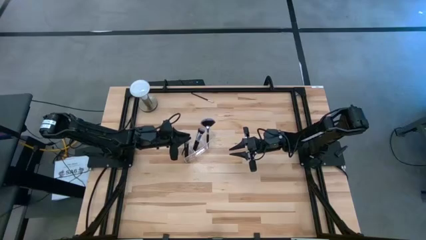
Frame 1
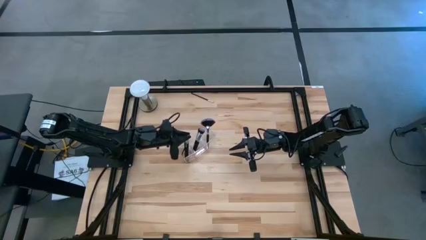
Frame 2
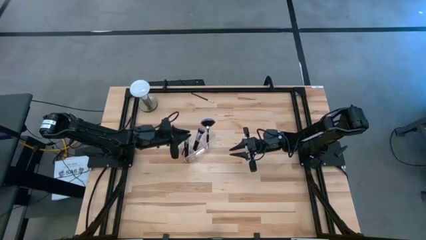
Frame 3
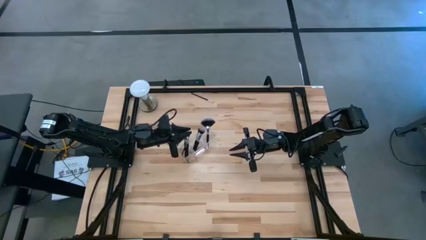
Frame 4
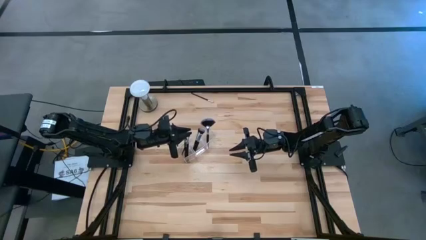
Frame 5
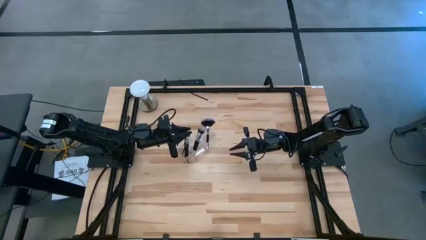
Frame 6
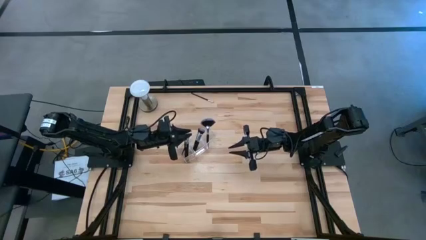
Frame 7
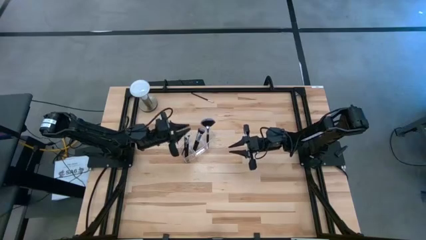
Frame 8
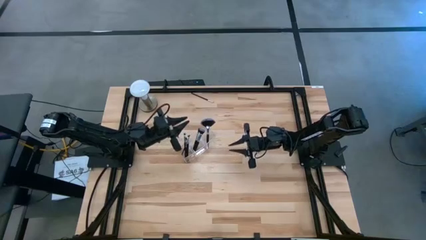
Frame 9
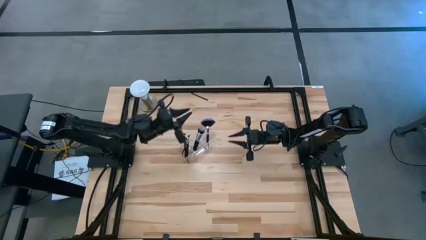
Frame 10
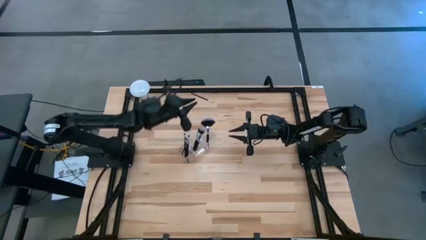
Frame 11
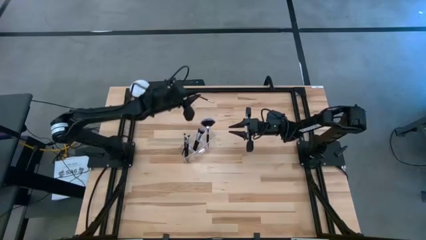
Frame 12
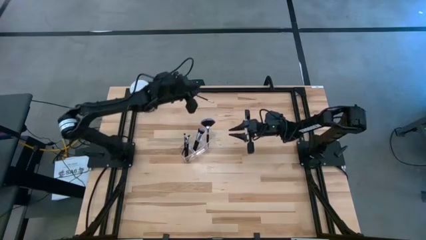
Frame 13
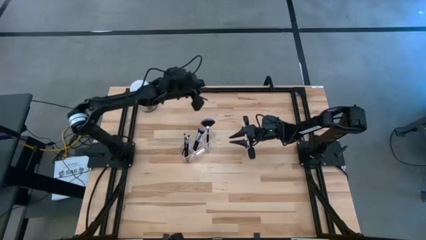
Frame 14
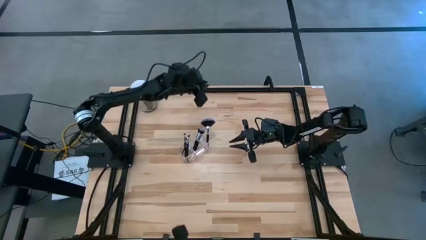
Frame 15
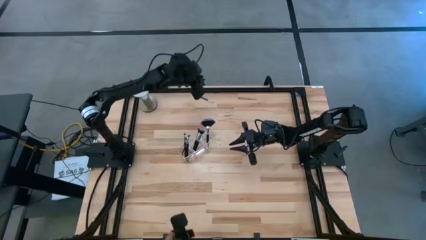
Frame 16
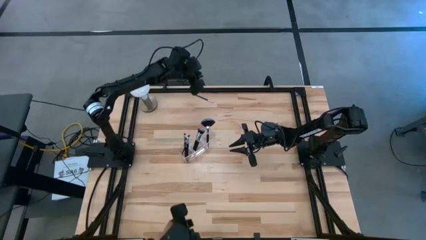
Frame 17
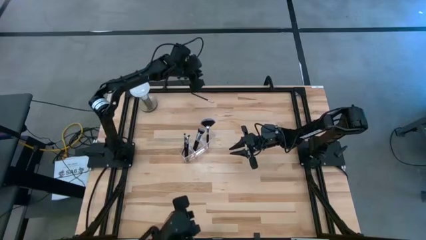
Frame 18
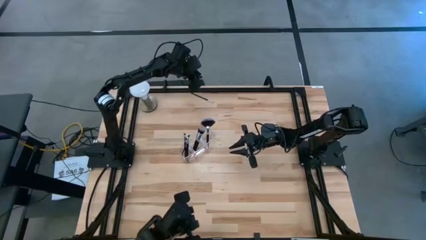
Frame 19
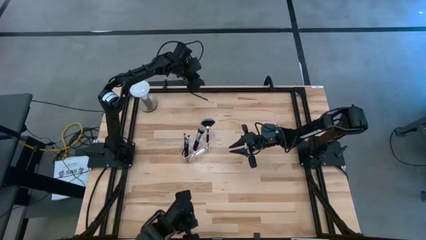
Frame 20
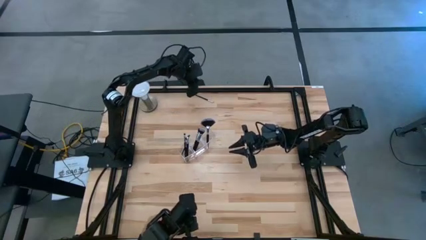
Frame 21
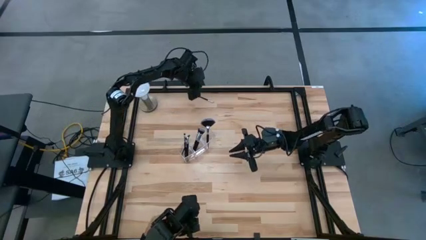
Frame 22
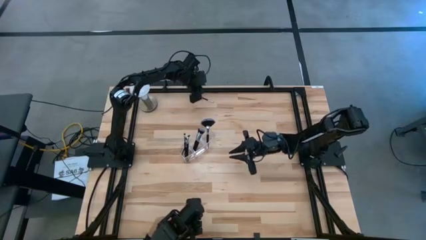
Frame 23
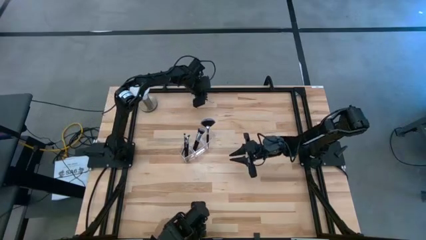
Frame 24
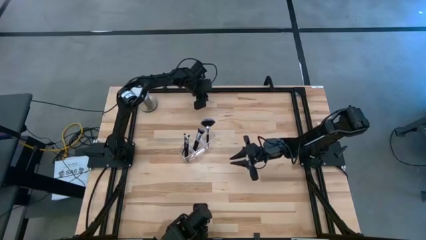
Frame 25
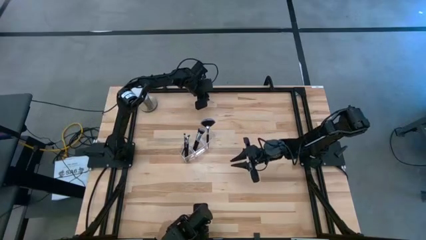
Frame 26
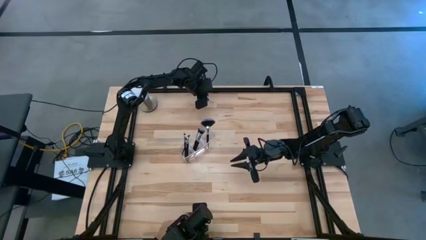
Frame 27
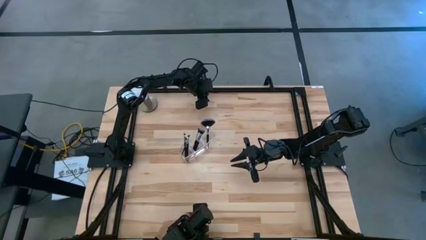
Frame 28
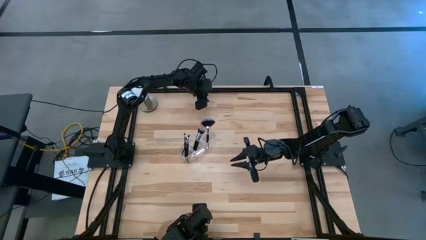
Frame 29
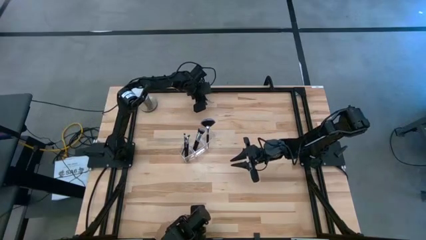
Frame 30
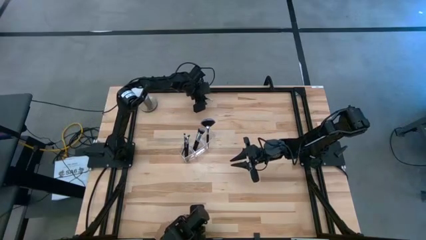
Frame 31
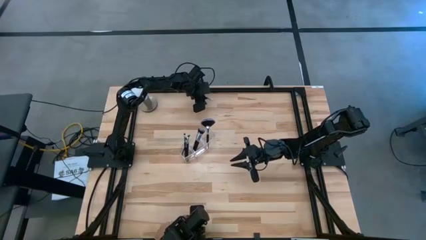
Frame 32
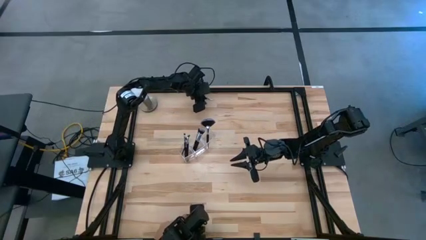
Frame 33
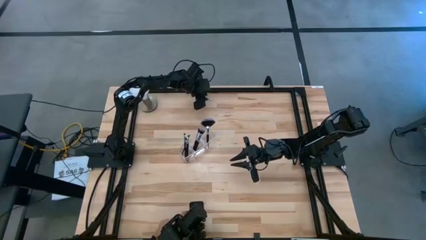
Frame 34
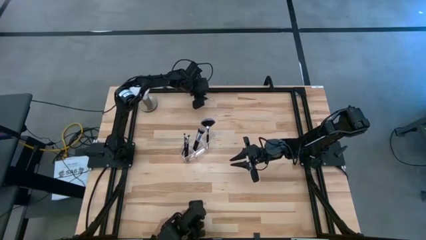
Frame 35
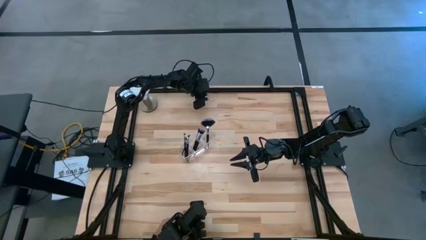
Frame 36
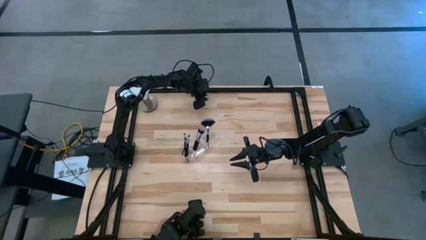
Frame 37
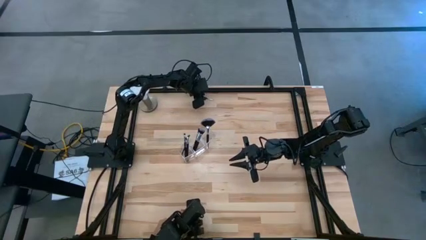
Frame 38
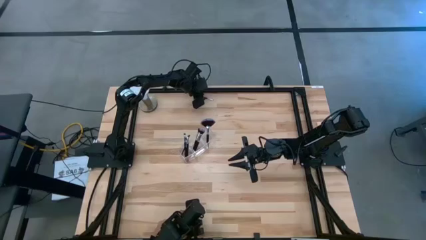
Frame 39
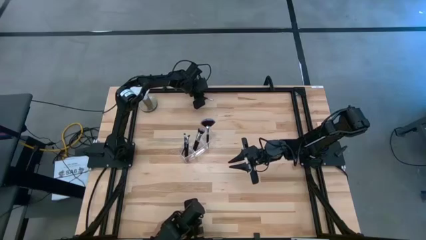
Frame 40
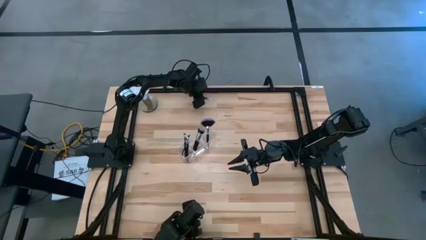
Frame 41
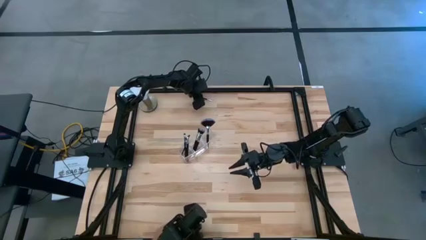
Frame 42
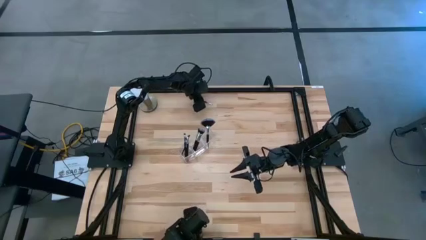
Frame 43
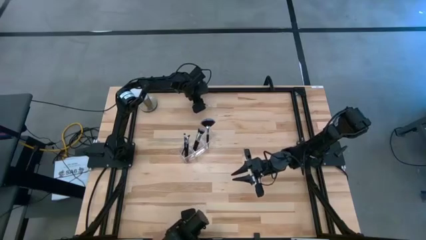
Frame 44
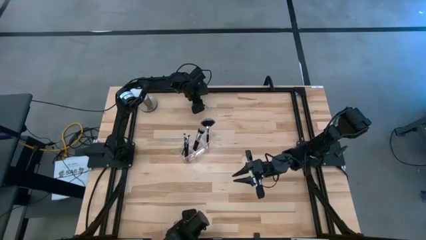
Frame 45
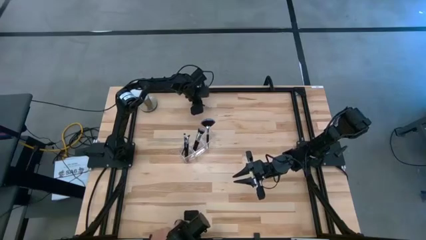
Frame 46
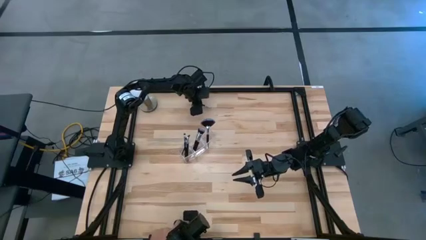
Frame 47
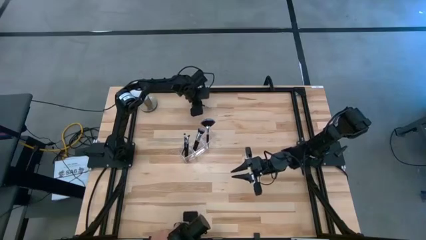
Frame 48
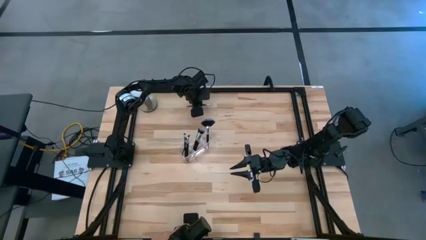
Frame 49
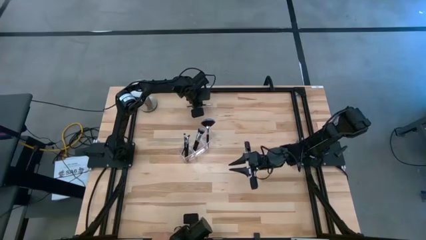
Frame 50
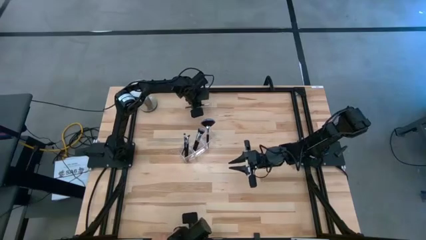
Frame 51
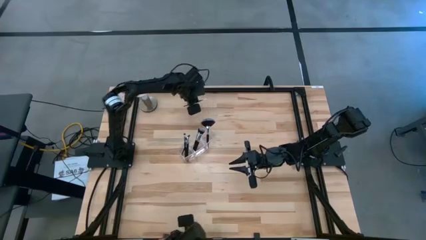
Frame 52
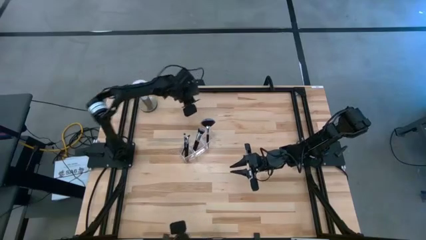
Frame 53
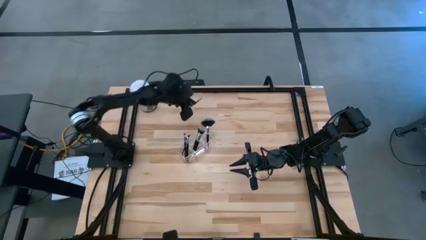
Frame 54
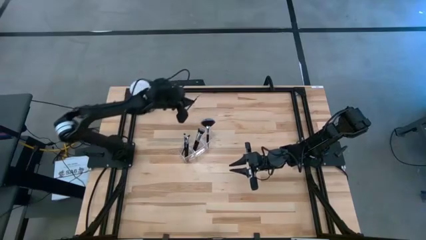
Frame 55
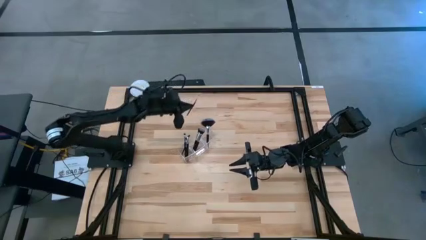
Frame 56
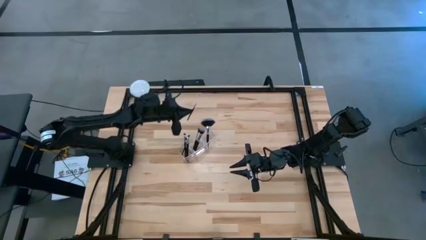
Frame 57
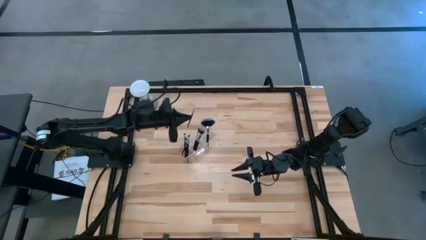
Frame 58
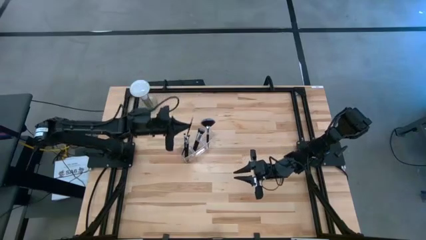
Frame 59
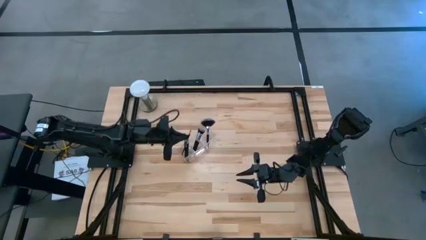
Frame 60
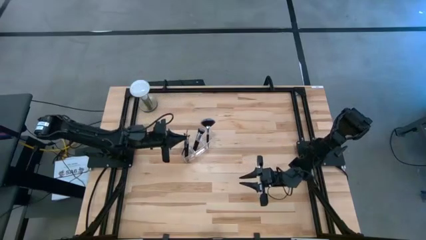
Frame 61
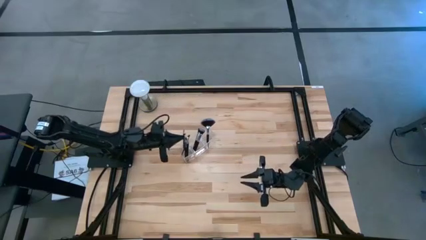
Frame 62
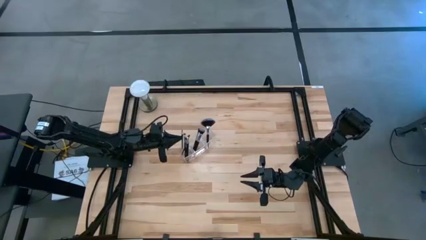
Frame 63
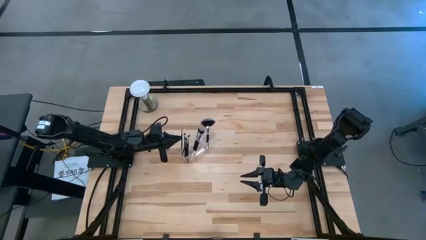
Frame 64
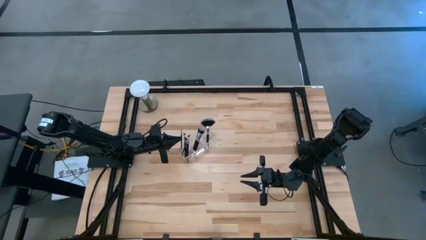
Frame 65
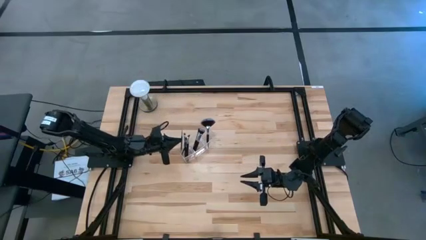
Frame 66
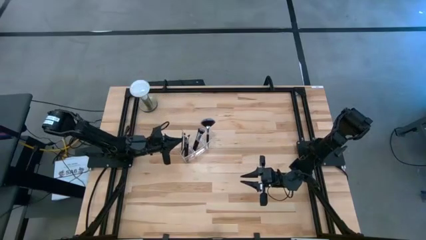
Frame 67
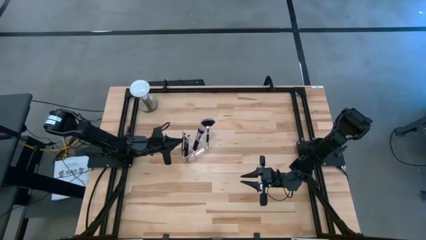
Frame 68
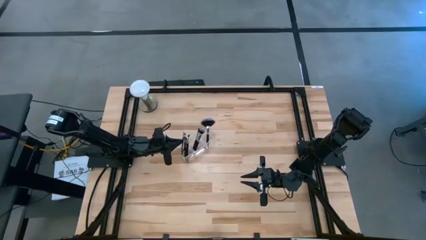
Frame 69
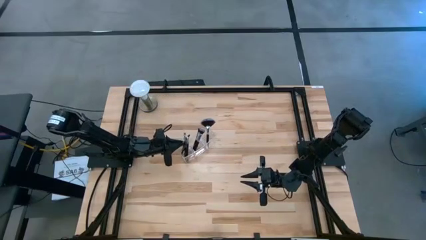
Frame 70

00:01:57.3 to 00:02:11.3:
Task: Put items in baskets/containers
Put the liner brush into the left section of the transparent organizer
